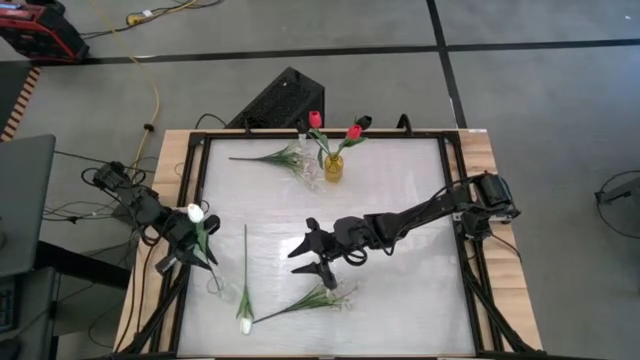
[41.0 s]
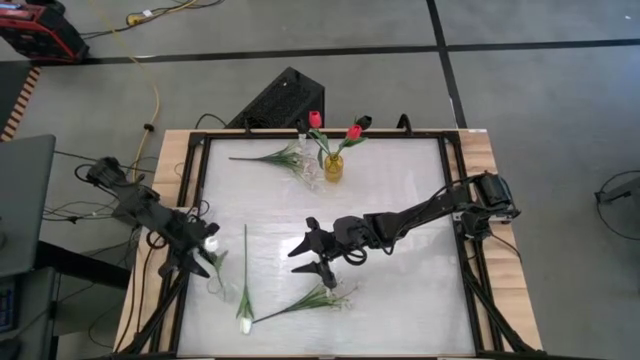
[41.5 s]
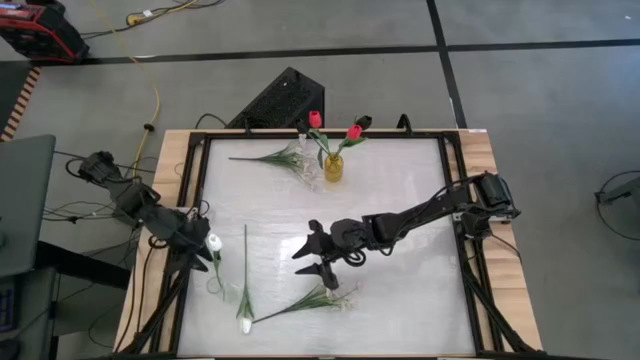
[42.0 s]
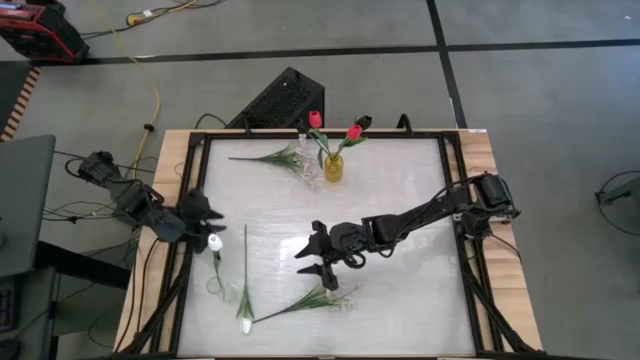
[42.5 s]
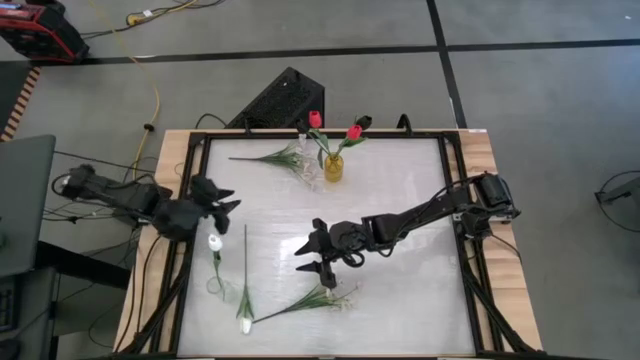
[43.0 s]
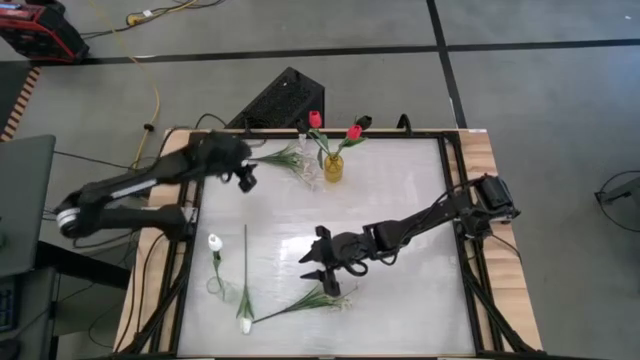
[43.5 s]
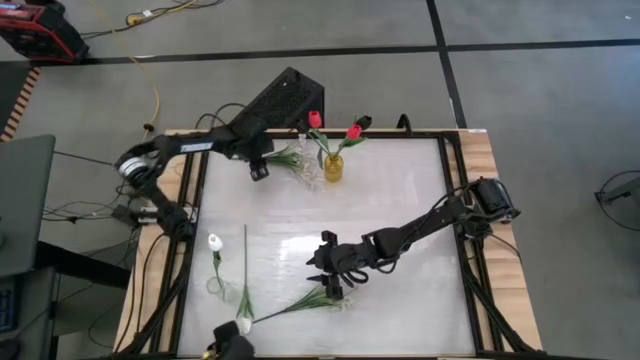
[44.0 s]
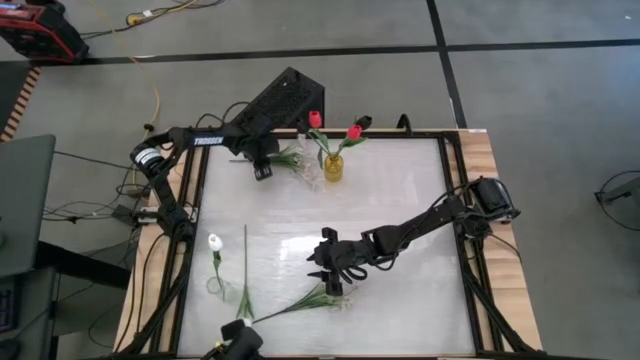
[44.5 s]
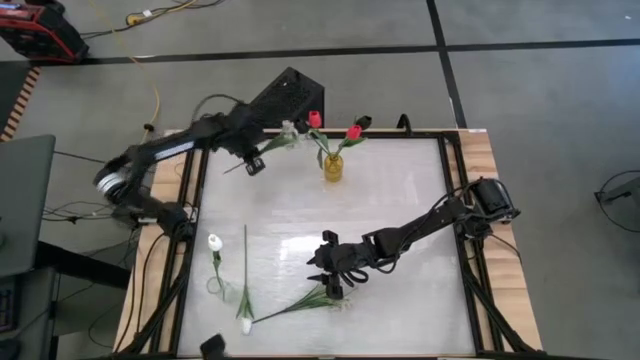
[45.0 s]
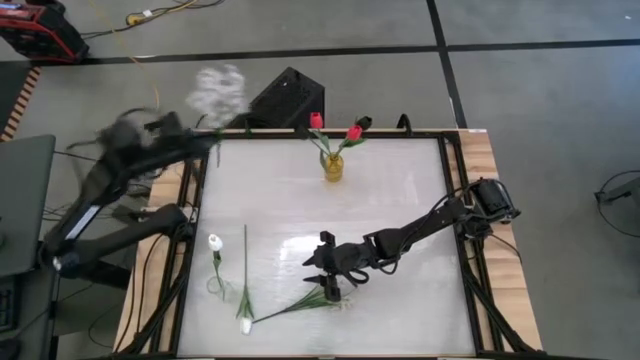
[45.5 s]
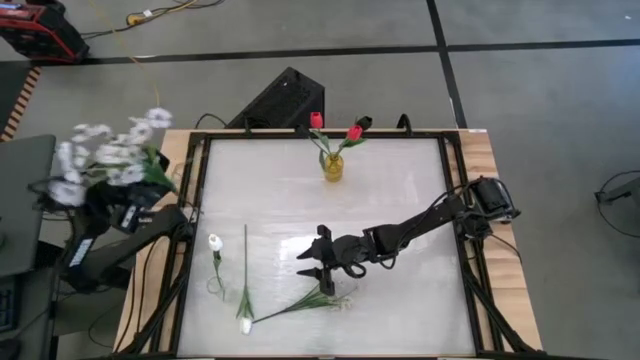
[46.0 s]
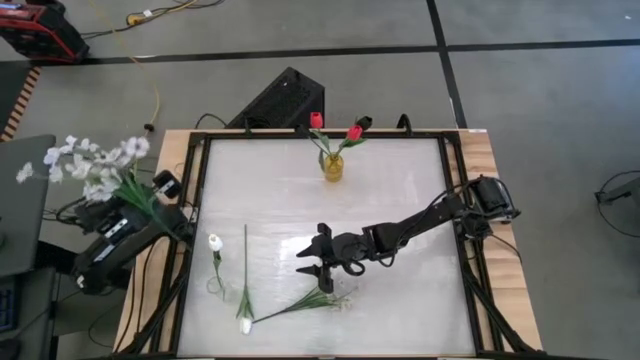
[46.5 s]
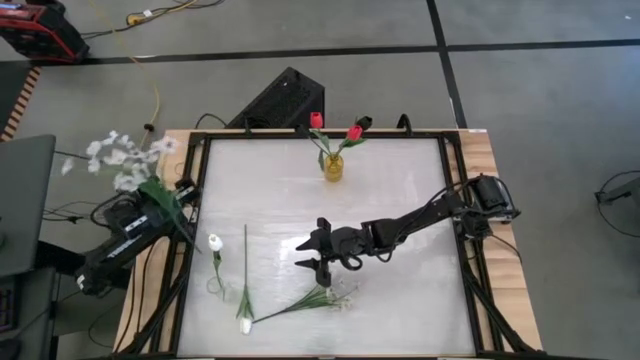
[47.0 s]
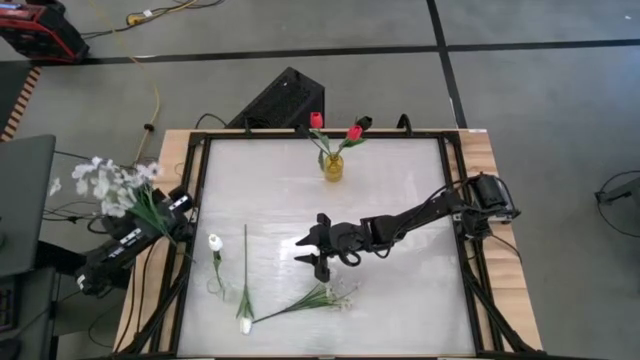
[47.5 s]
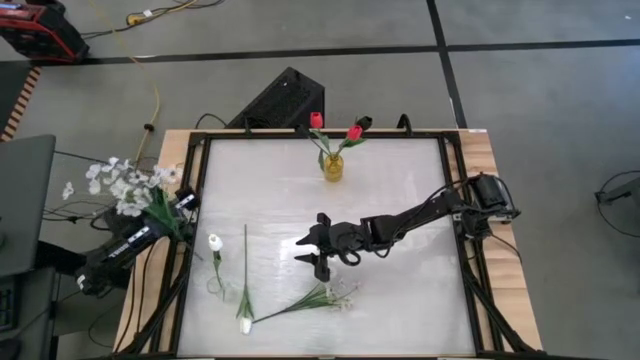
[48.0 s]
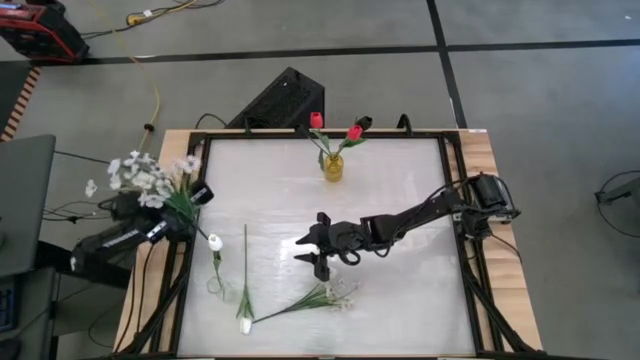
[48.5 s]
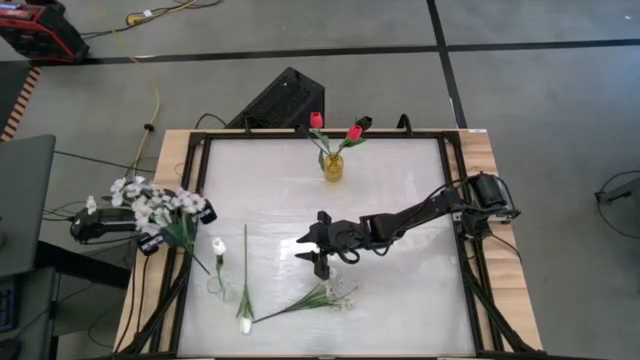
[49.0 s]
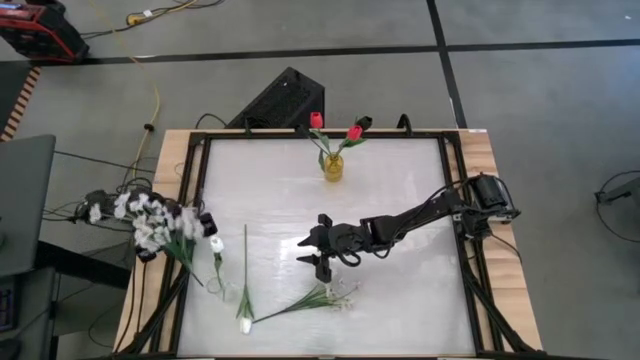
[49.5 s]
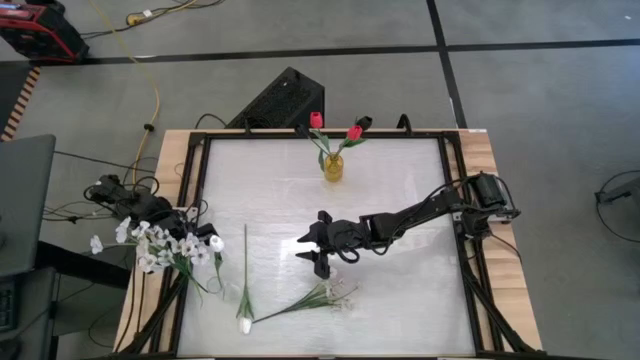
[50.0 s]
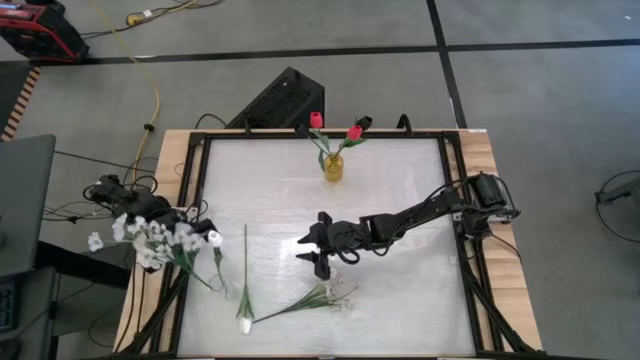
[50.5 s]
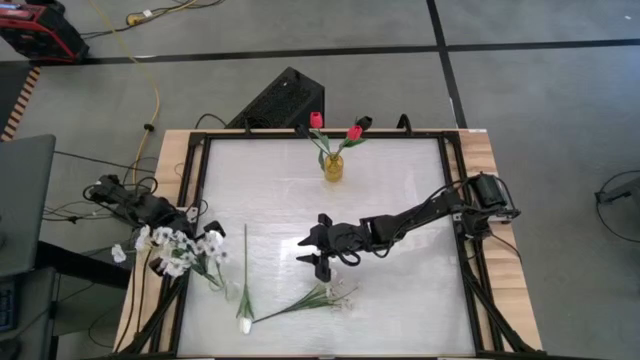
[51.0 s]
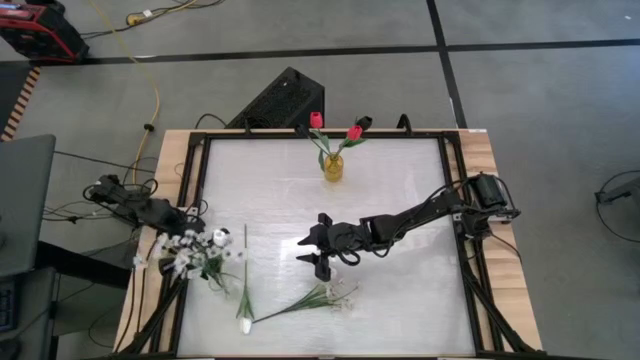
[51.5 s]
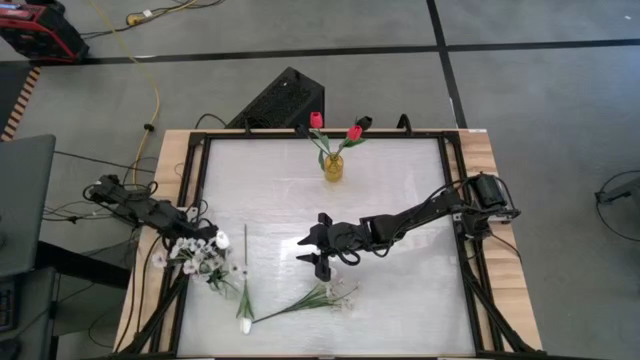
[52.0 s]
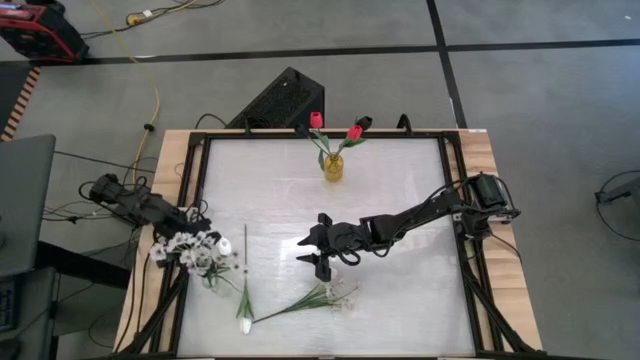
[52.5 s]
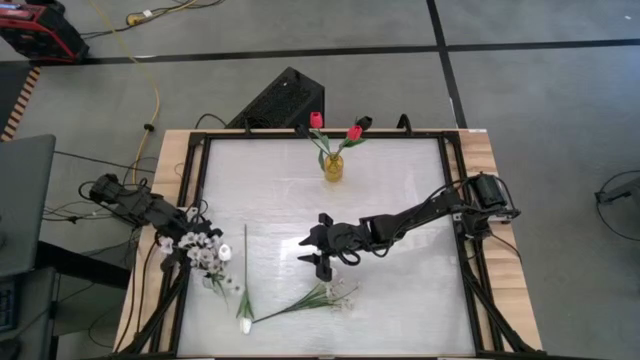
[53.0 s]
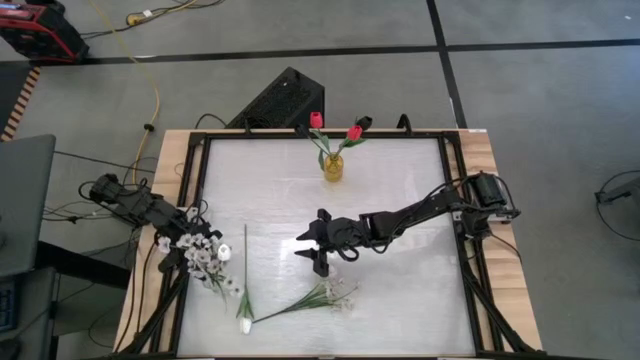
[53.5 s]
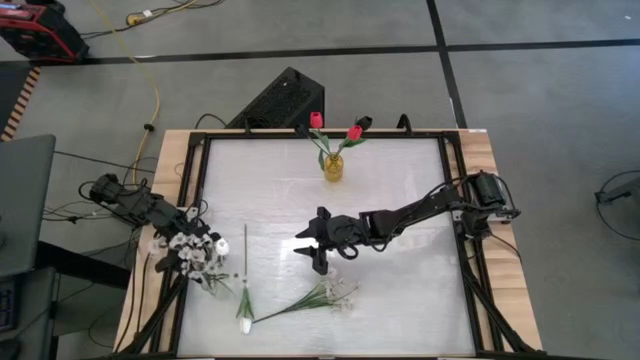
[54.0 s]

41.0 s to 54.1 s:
Task: Sort flowers into vase by color
Put the top white flowers into the transparent vase

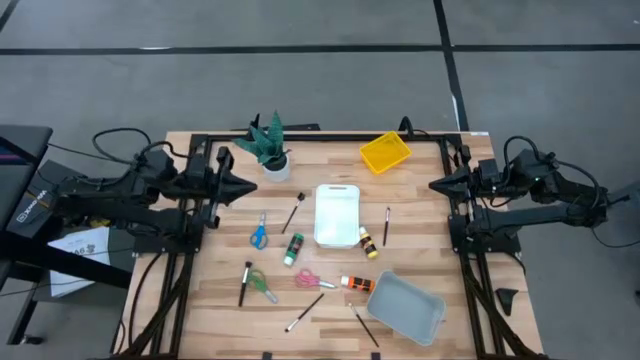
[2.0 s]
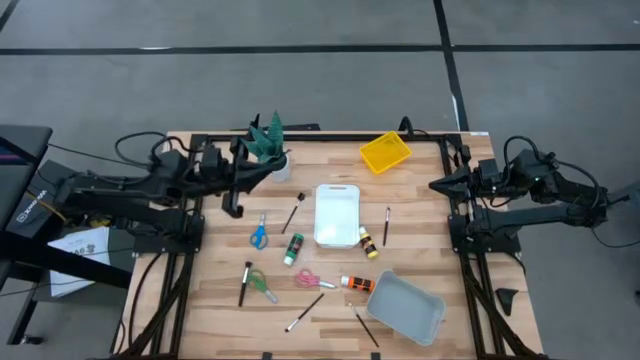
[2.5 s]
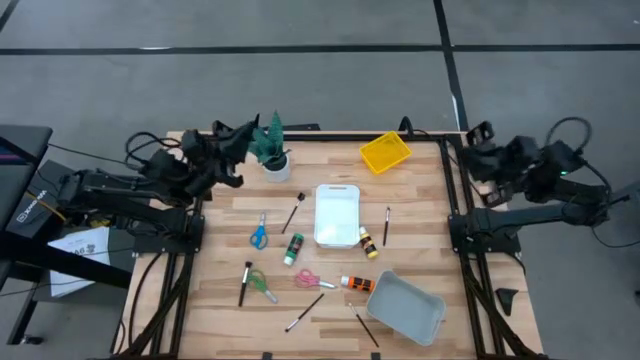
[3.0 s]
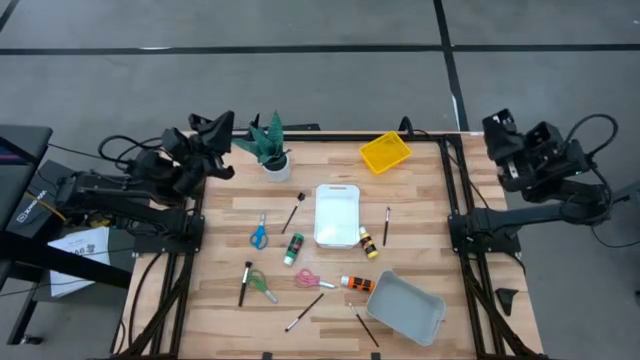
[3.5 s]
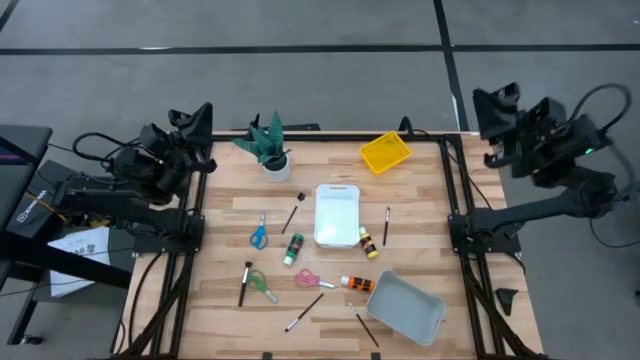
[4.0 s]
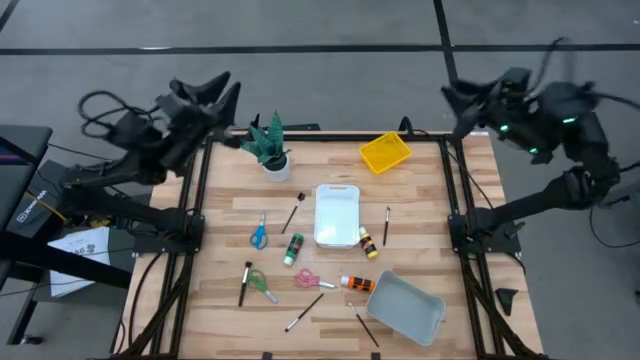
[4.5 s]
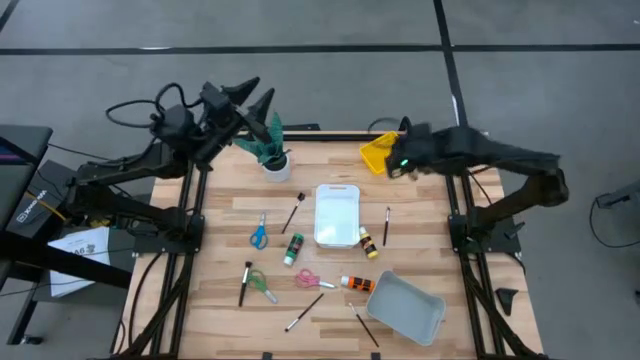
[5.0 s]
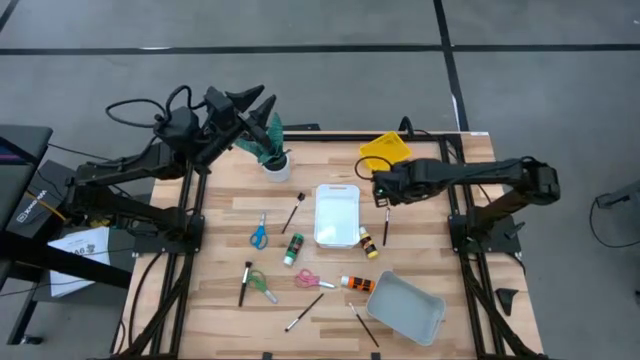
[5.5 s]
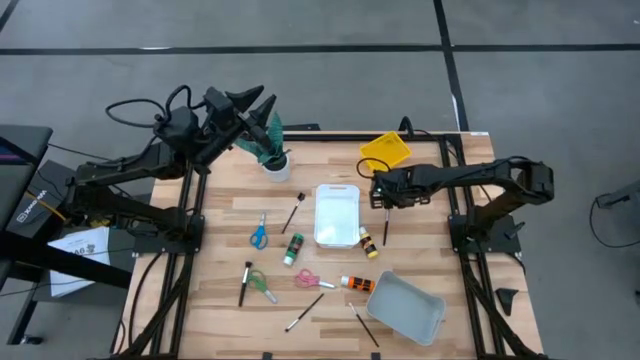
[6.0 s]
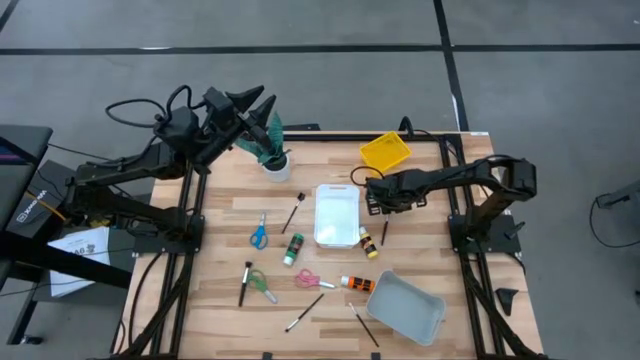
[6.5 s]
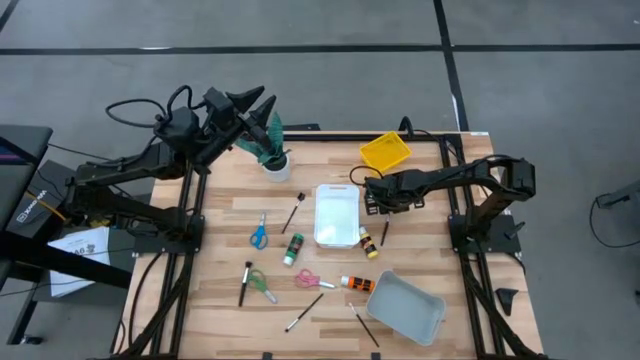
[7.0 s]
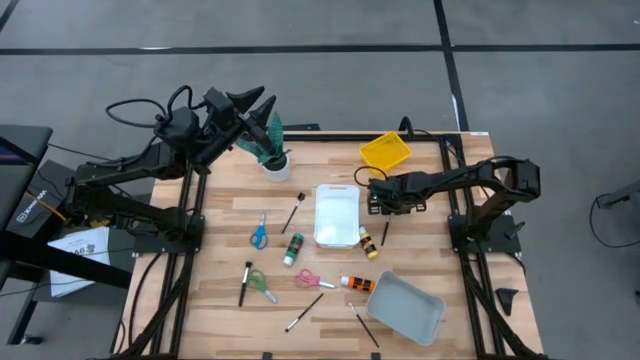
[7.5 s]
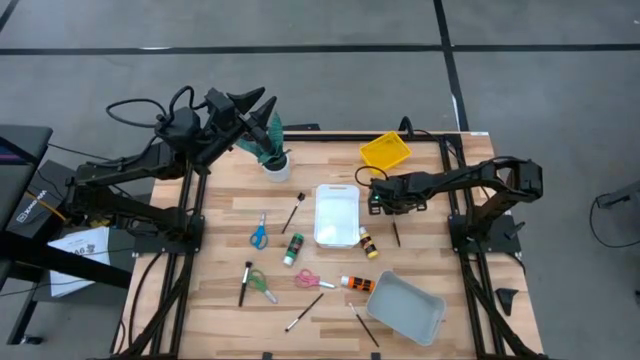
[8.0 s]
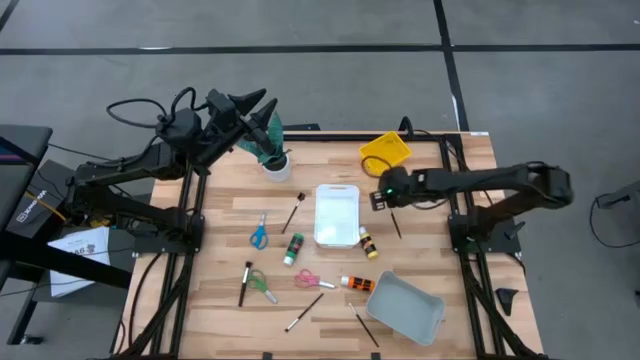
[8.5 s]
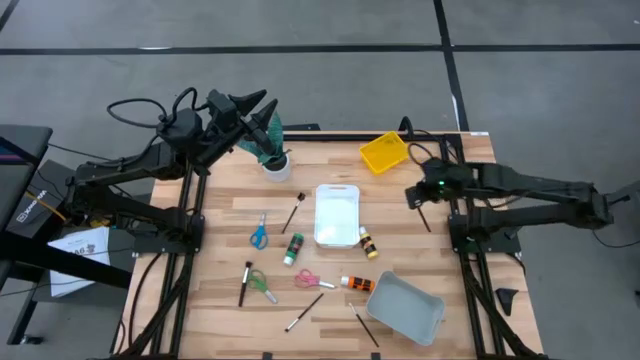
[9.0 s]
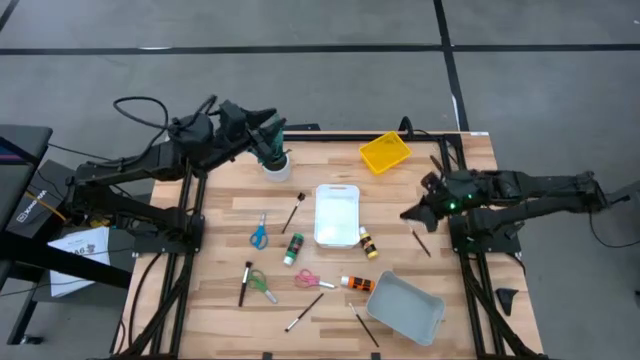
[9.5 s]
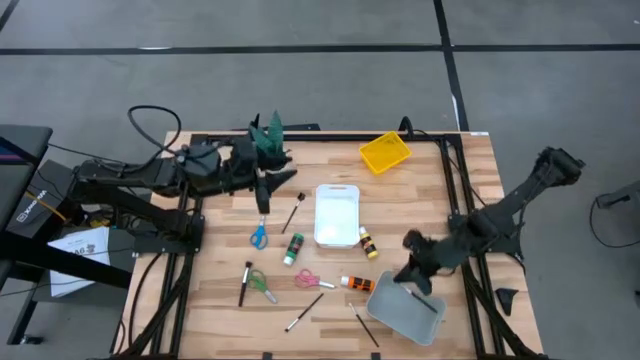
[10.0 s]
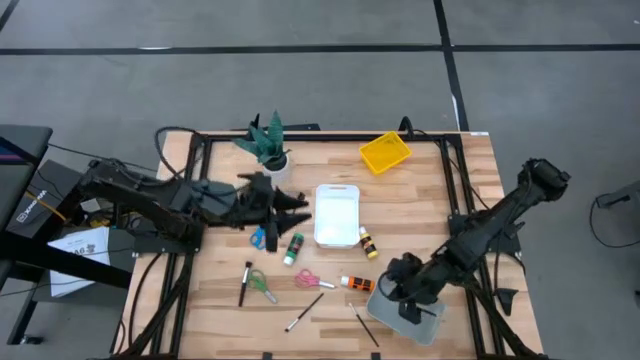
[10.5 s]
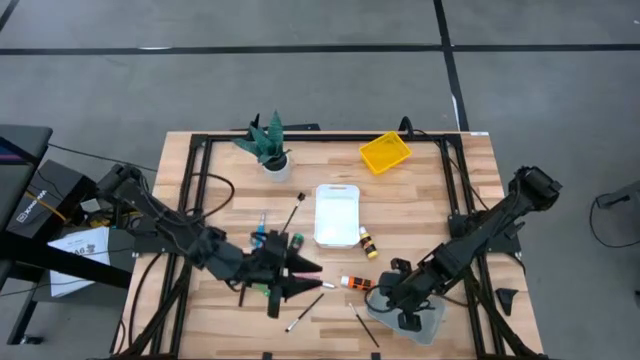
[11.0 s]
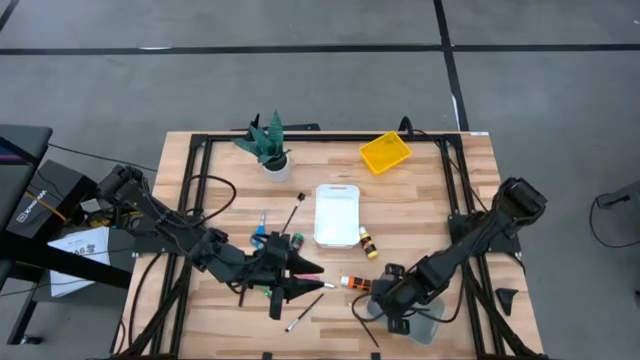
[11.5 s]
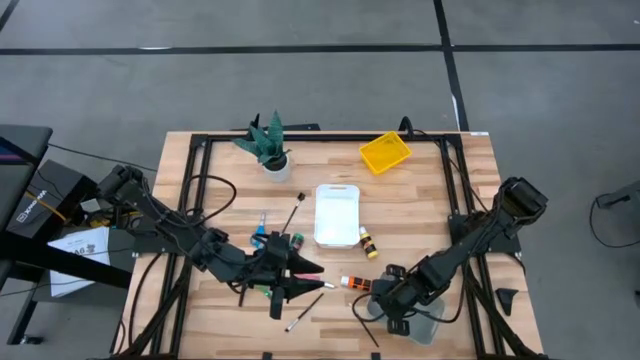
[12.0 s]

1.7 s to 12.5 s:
Task: Pick & Place Paint Supplies
Put the top right eyeshadow brush into the gray bin
